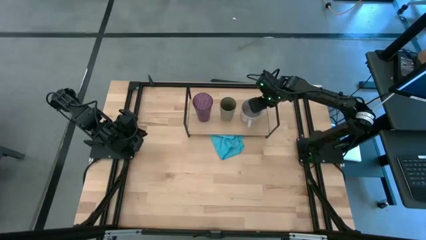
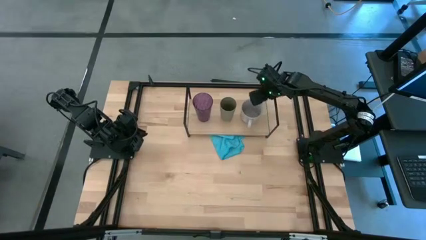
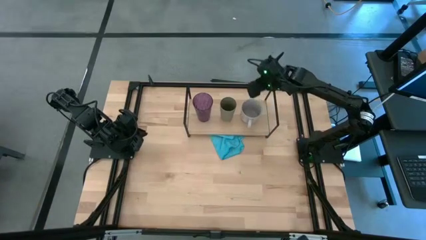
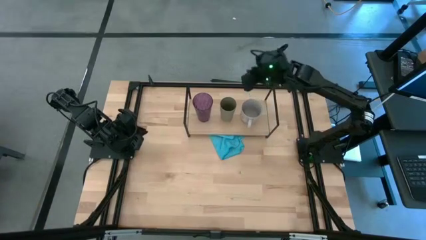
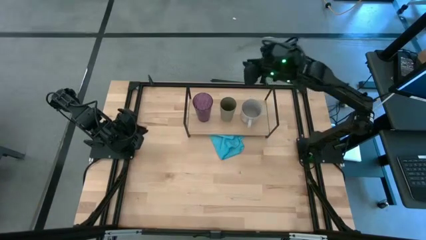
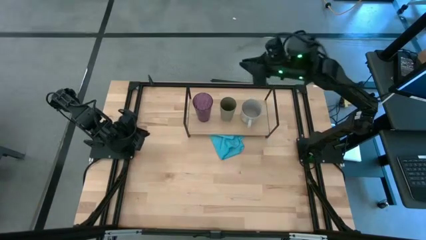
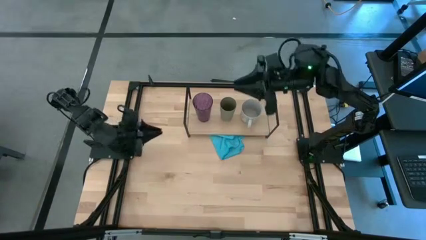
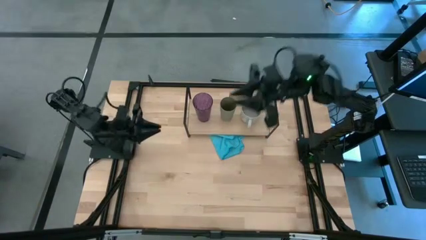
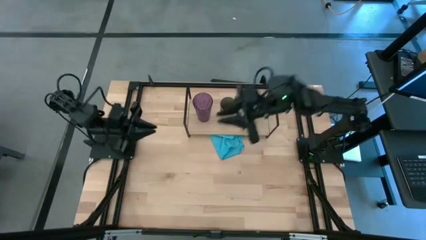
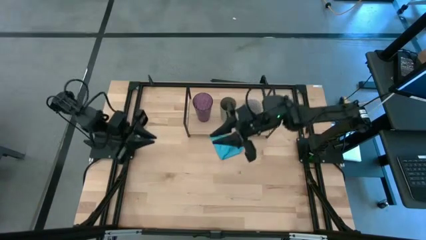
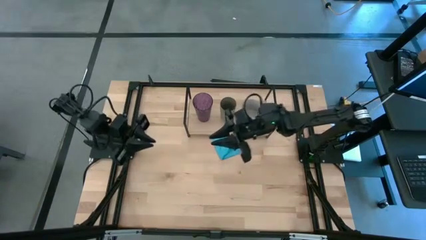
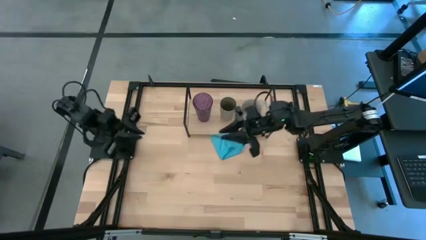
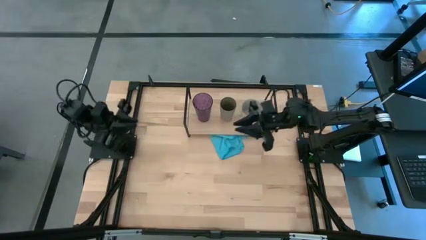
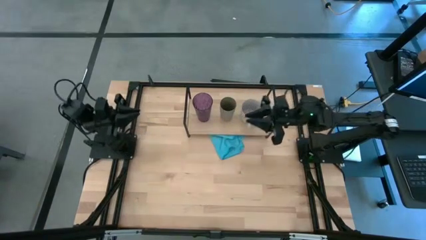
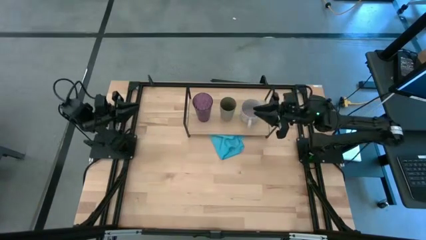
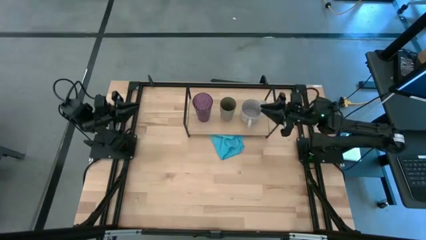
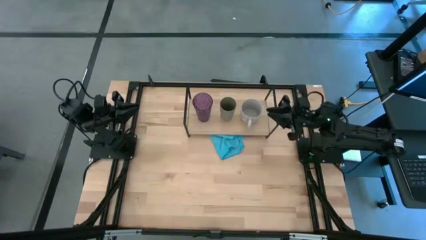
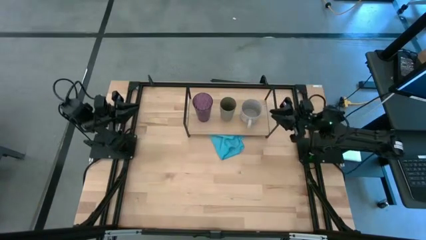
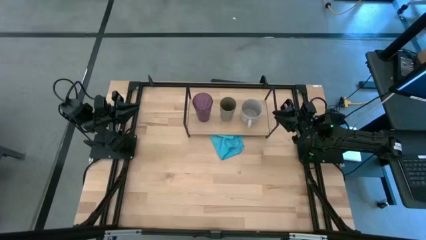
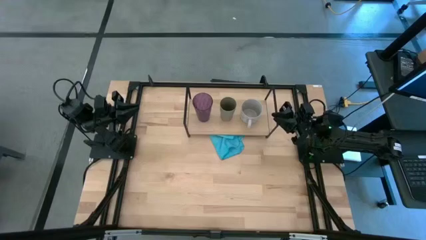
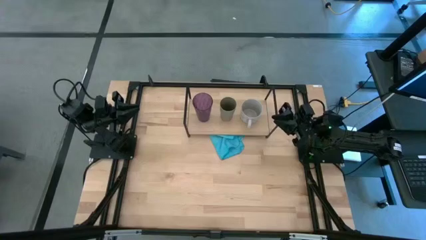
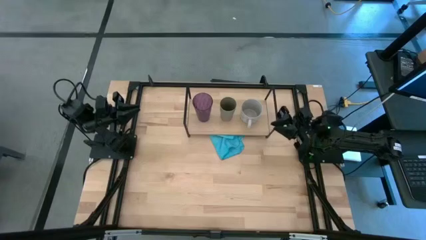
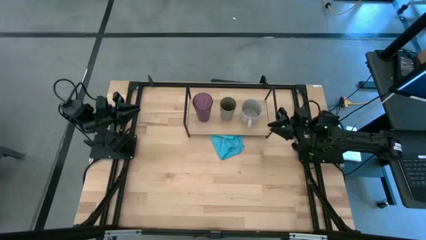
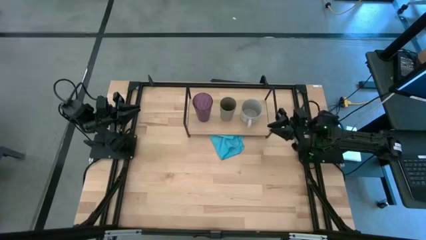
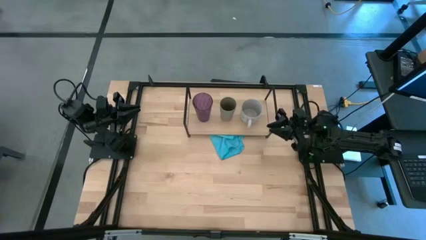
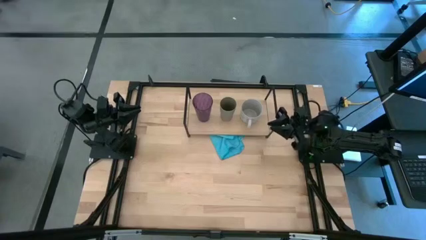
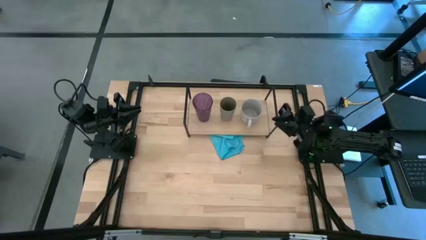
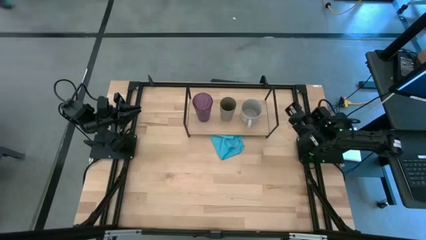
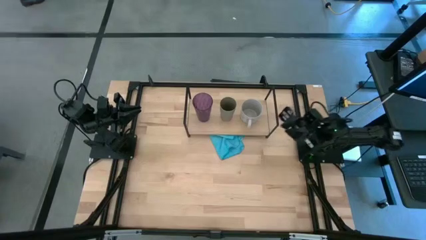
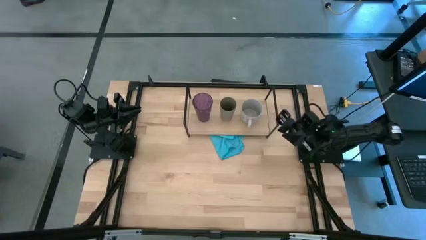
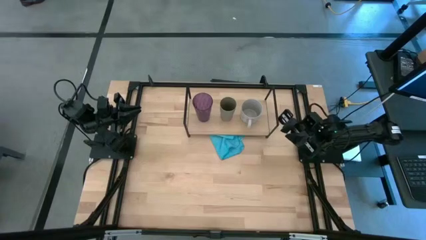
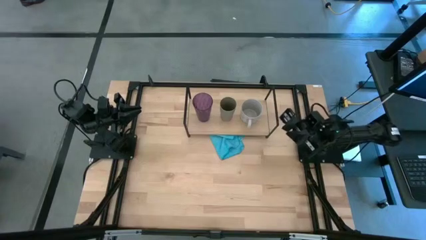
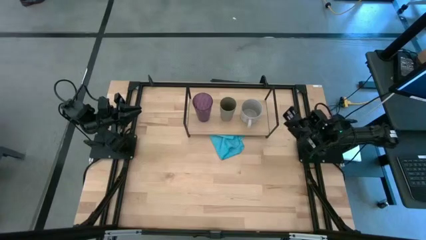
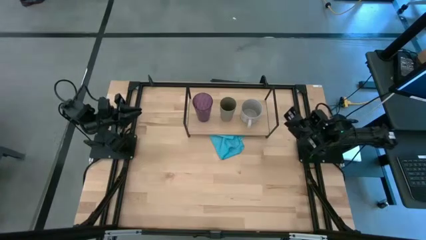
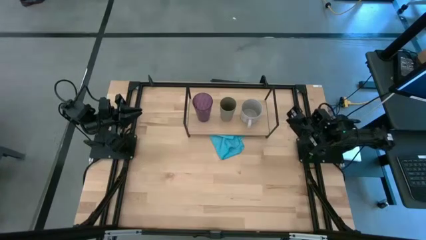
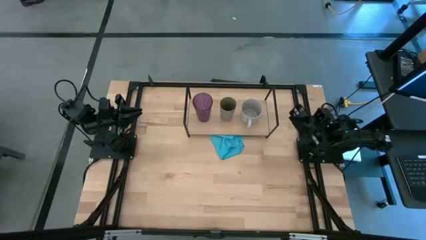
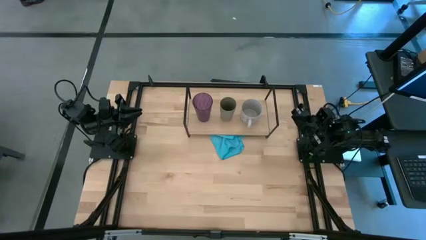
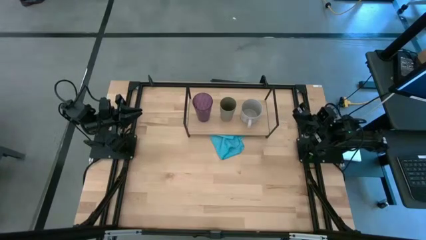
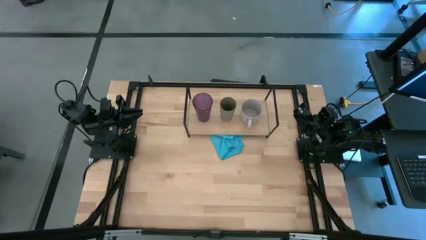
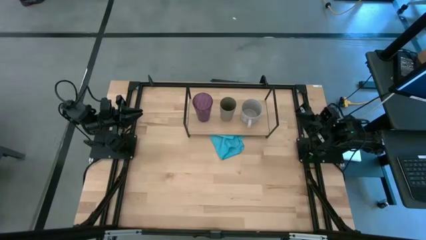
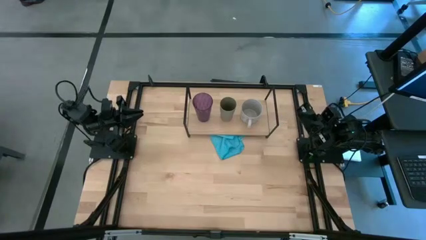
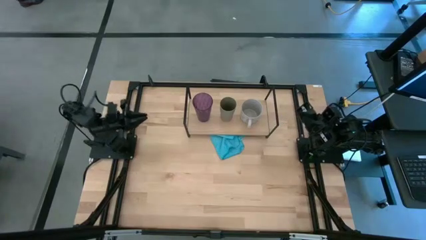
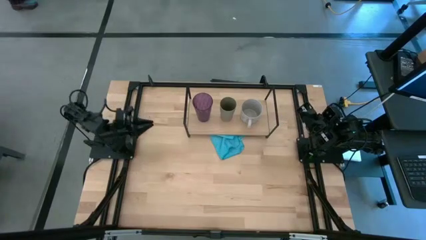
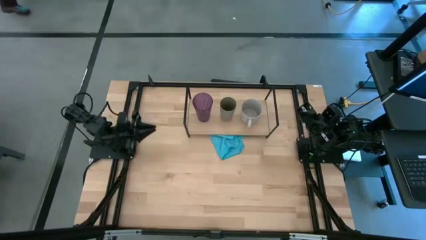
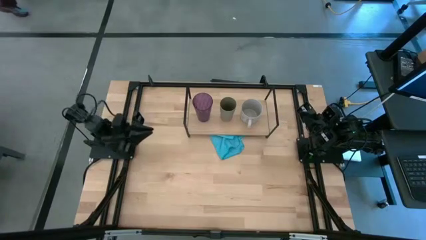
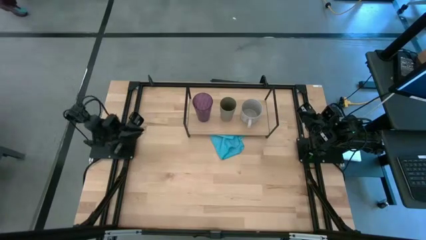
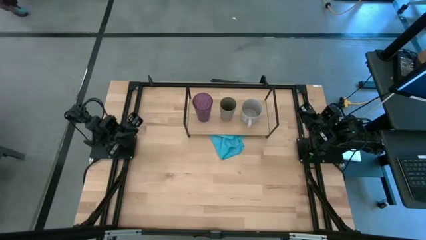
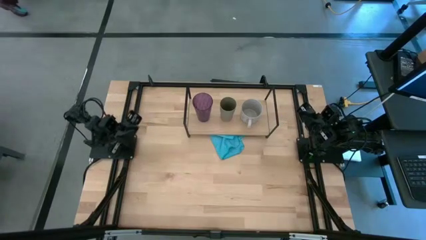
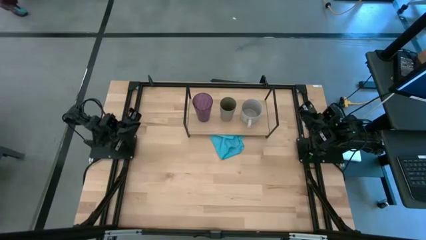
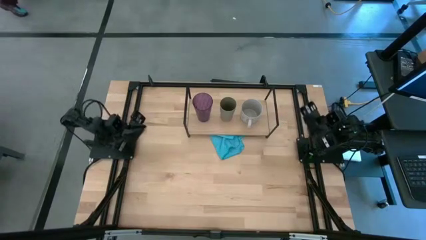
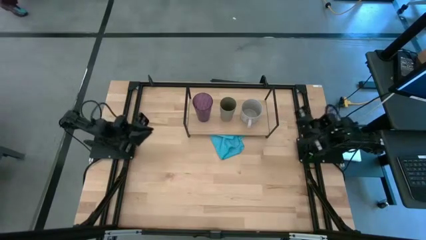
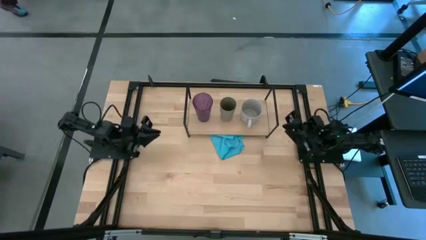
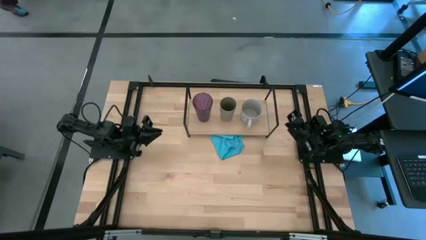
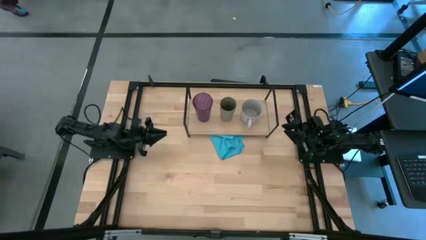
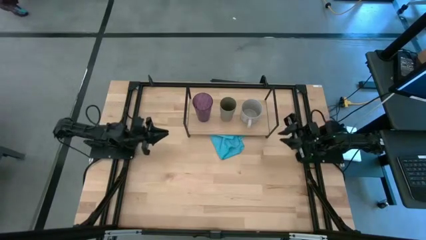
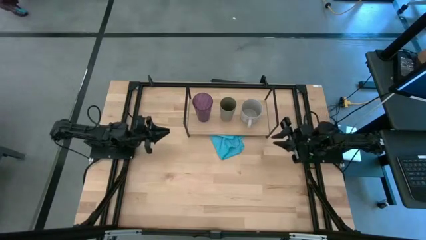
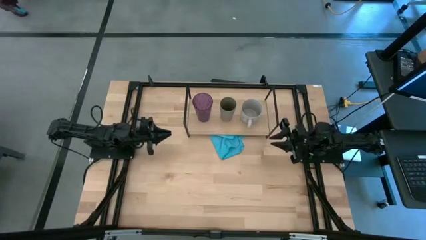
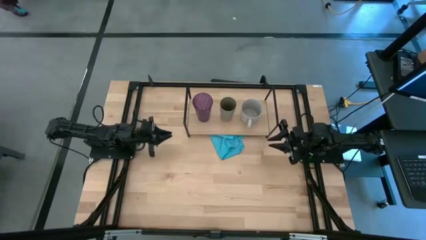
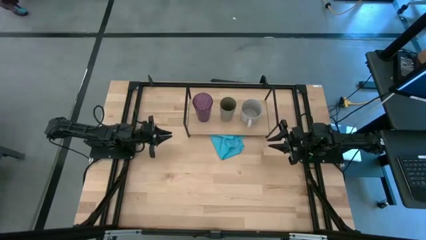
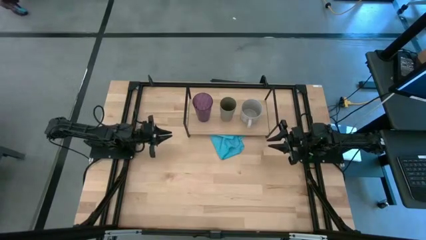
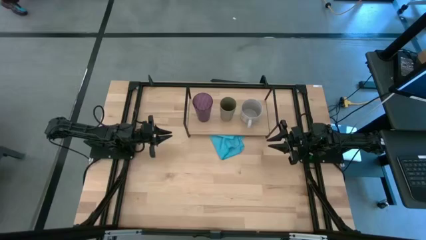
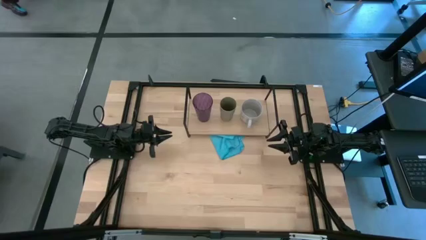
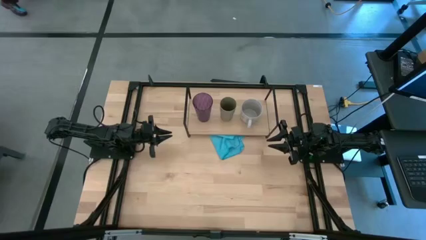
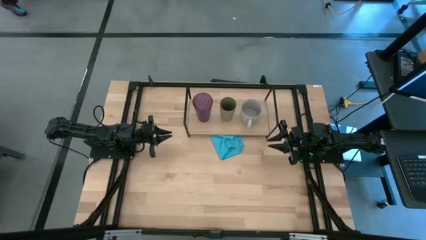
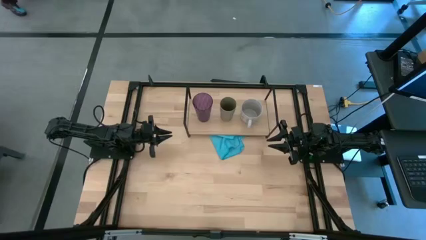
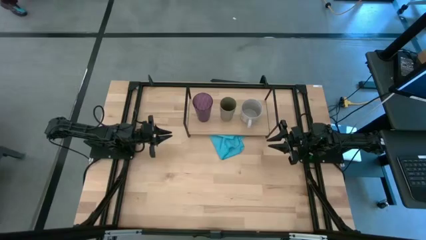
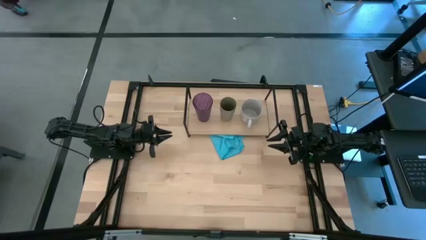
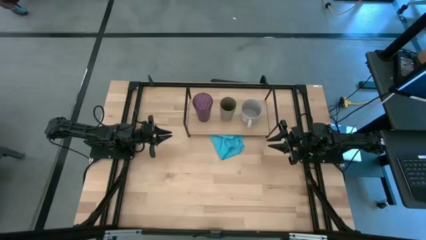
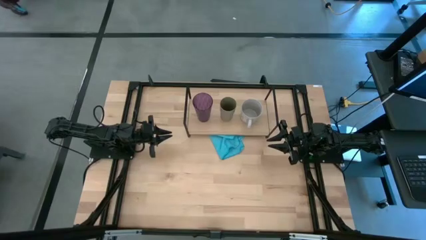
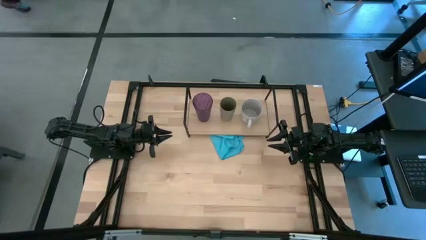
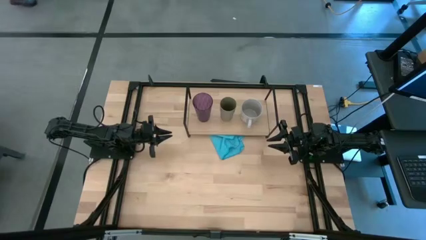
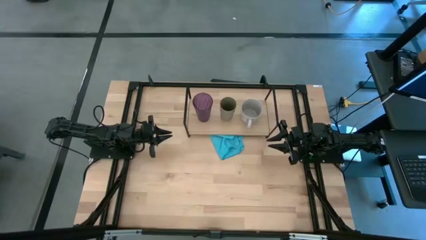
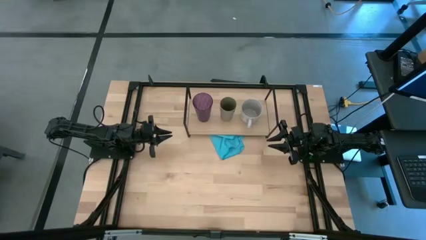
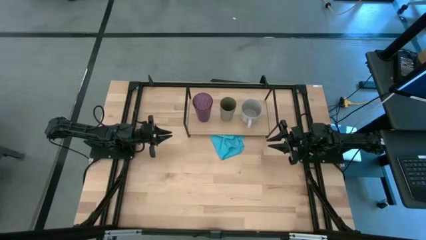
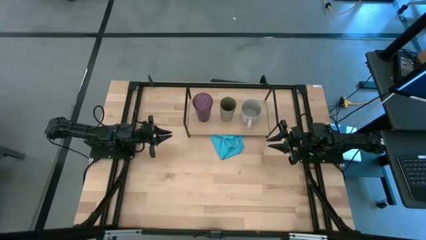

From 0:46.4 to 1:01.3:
Task: Stack small to large cups/mugs on shelf
Return to Home Position

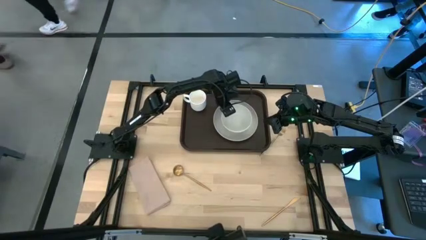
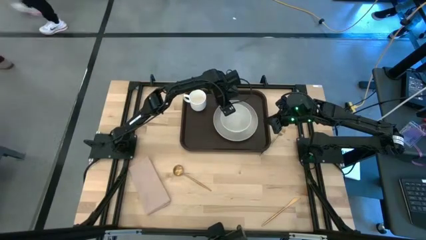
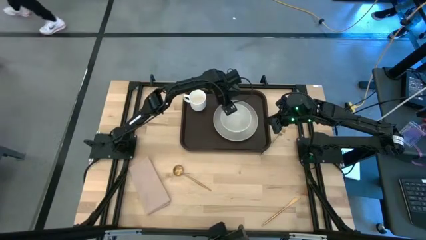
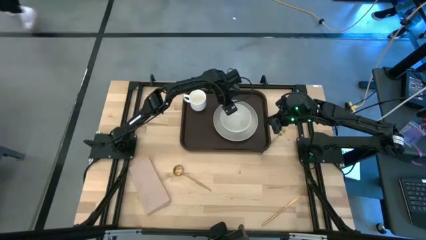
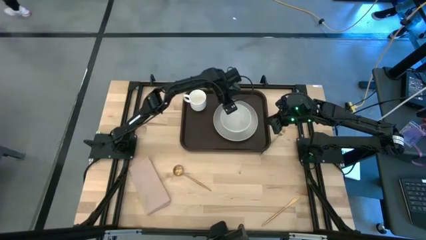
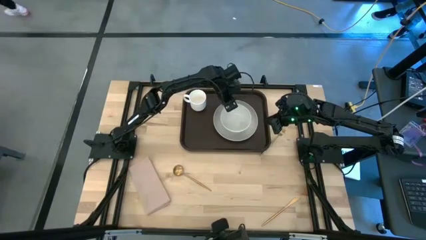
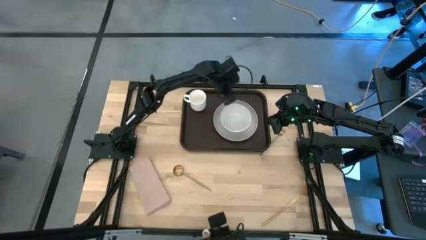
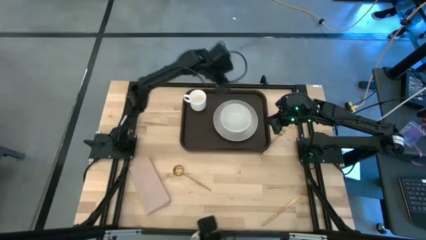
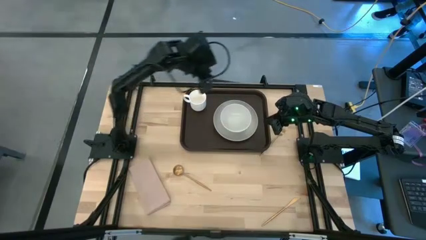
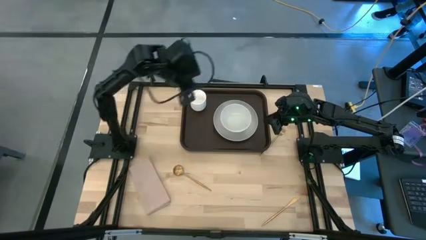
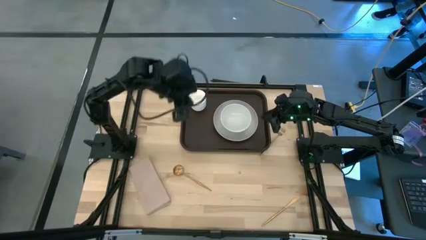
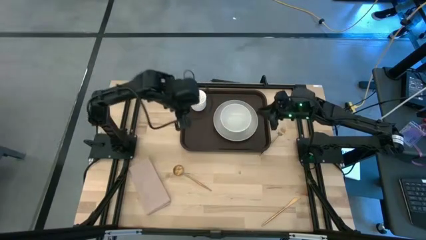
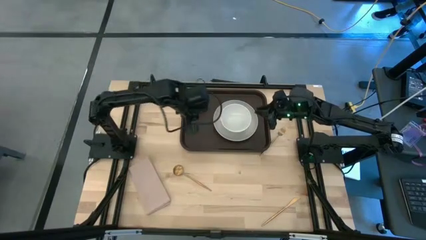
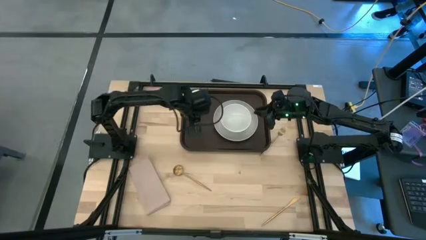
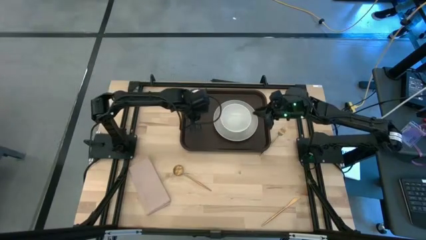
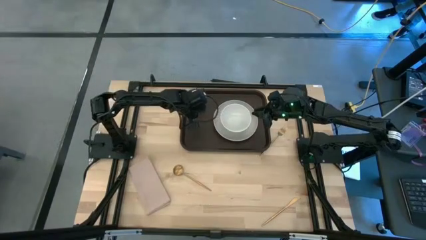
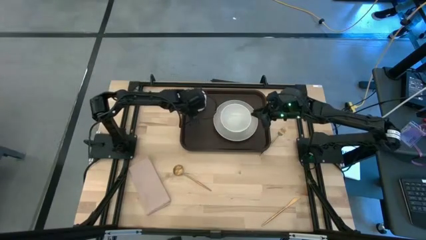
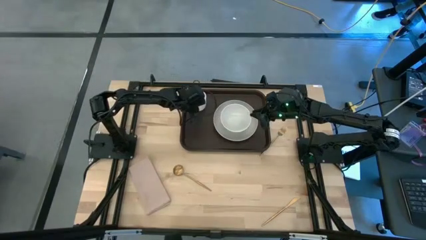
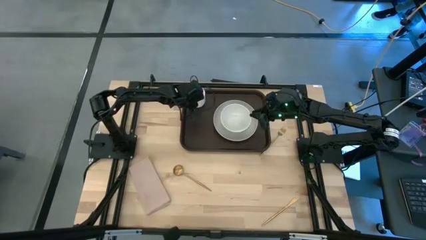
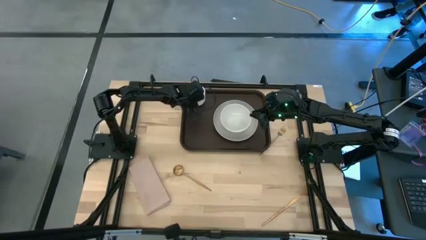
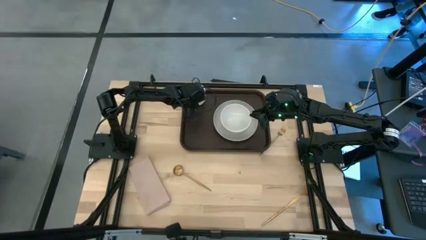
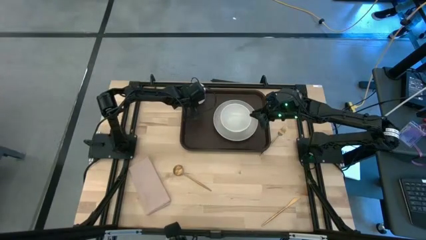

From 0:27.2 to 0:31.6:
Task: Set up tray
Adjust the white mug on the brown serving tray
